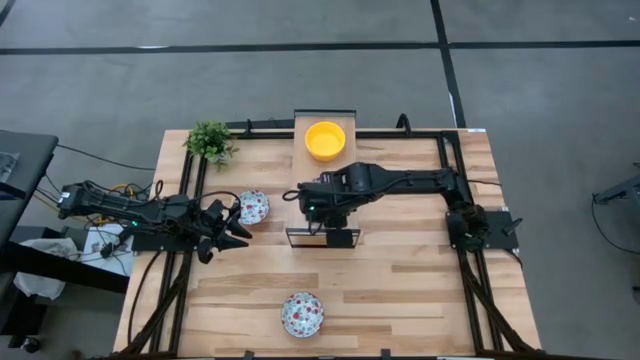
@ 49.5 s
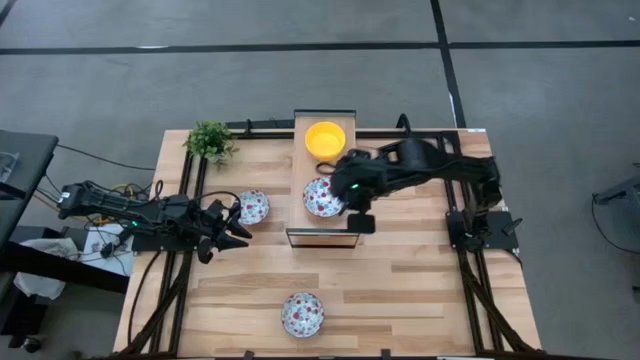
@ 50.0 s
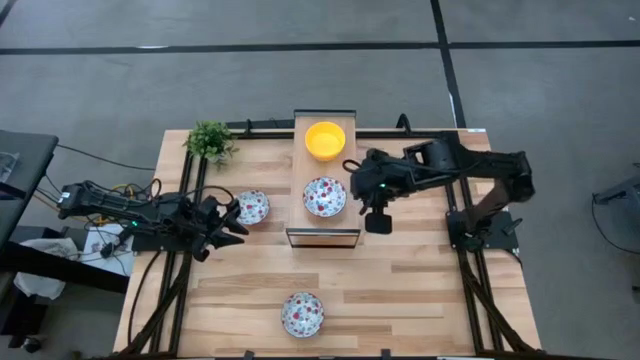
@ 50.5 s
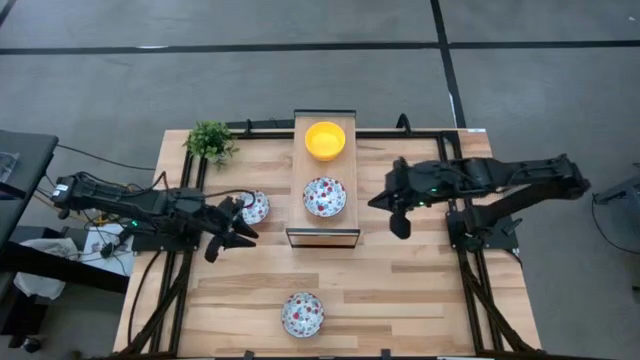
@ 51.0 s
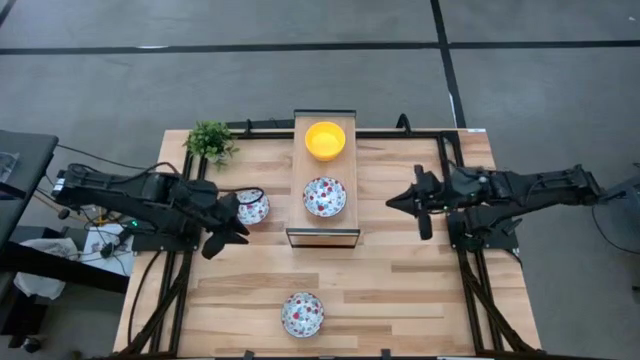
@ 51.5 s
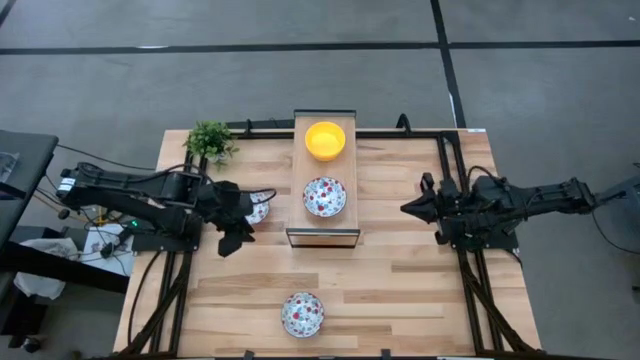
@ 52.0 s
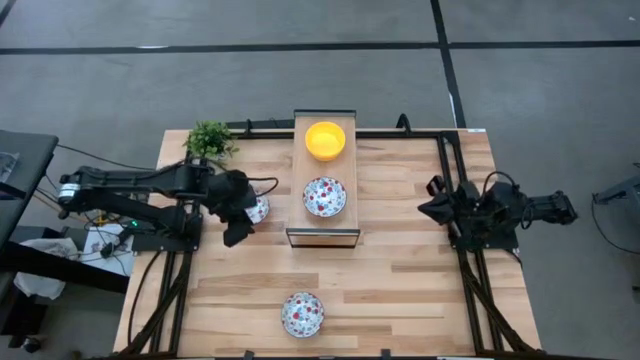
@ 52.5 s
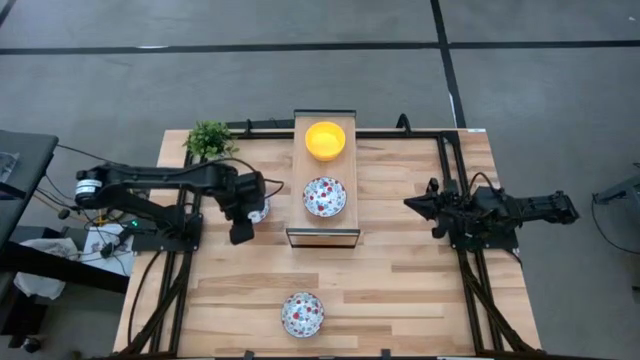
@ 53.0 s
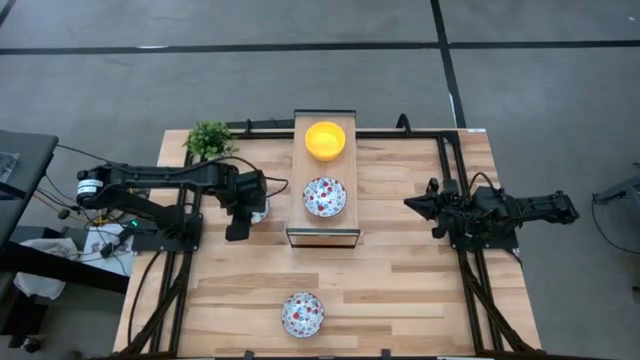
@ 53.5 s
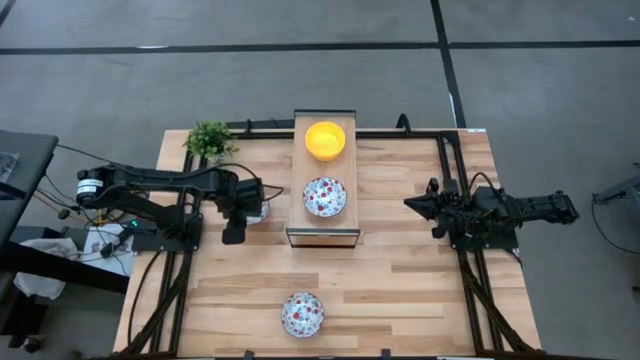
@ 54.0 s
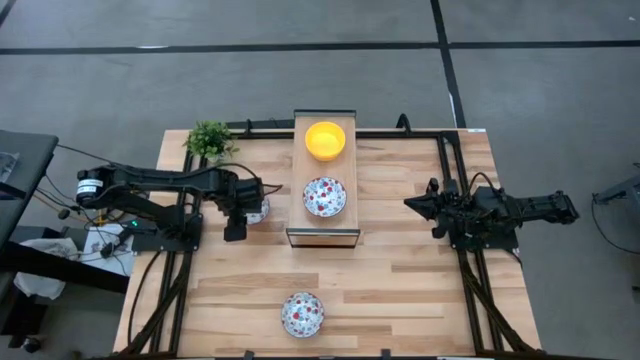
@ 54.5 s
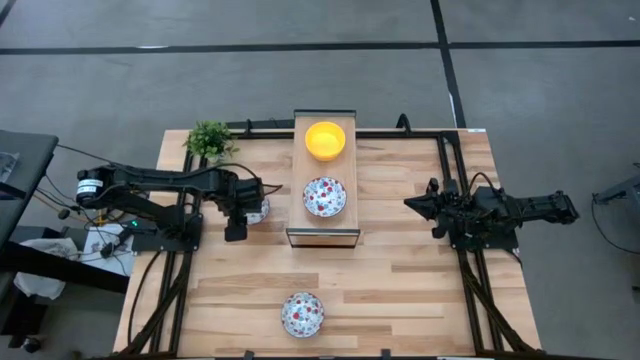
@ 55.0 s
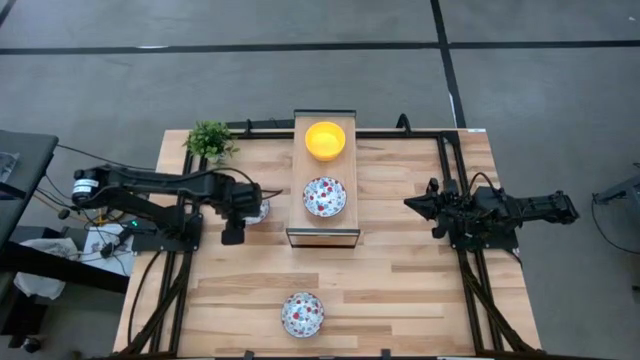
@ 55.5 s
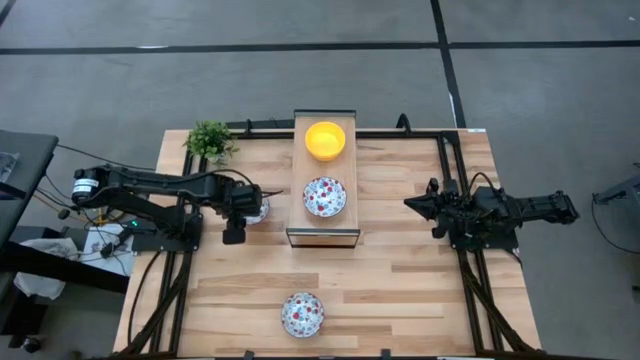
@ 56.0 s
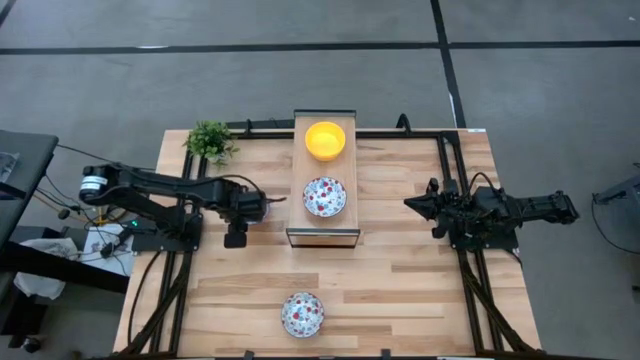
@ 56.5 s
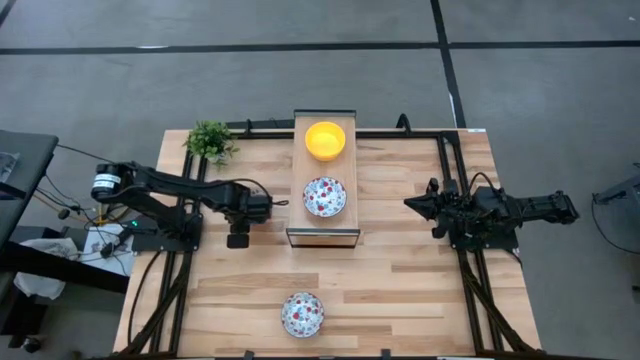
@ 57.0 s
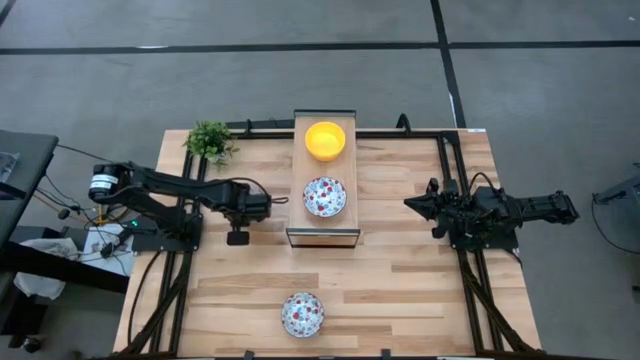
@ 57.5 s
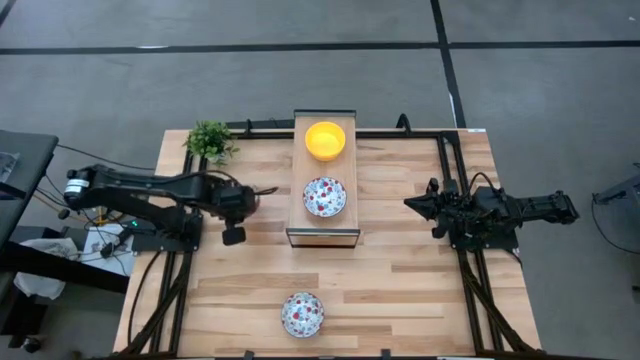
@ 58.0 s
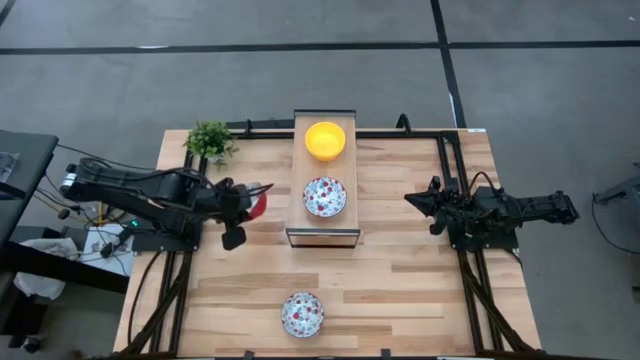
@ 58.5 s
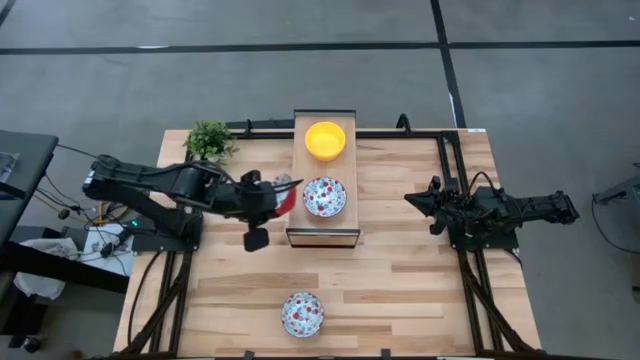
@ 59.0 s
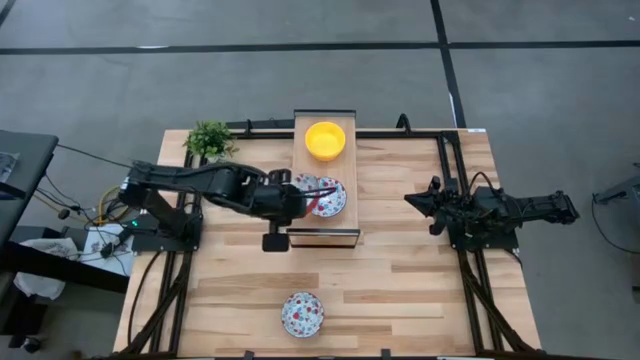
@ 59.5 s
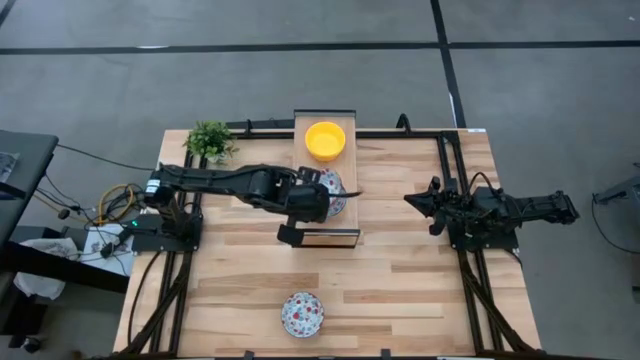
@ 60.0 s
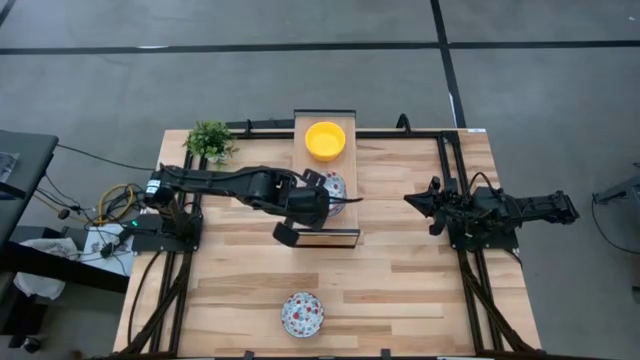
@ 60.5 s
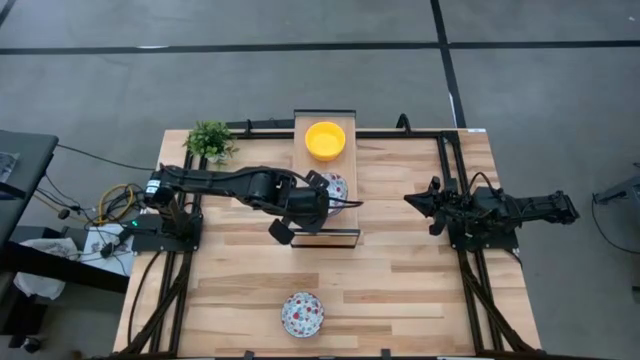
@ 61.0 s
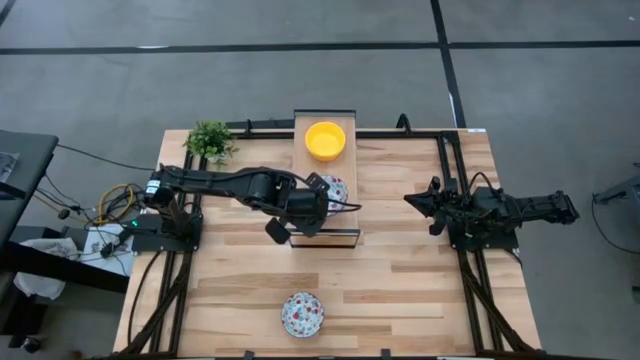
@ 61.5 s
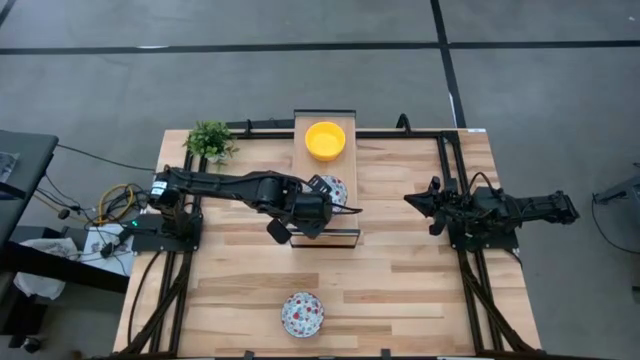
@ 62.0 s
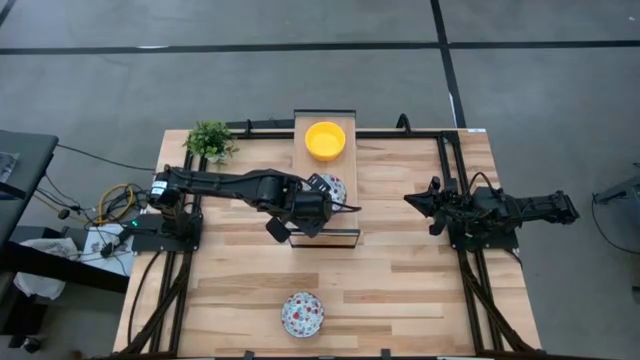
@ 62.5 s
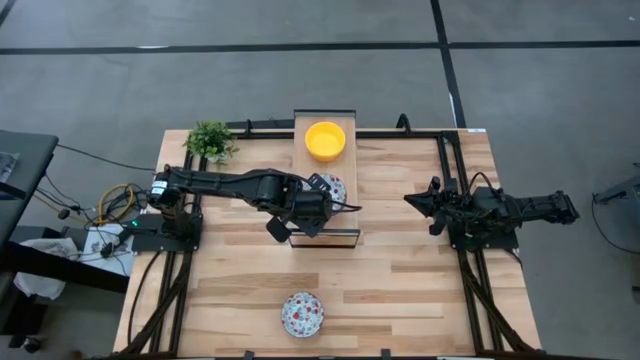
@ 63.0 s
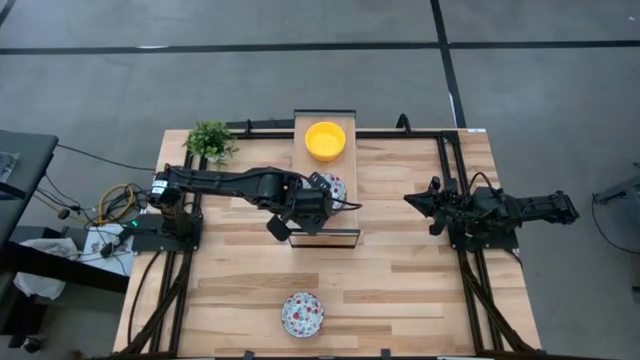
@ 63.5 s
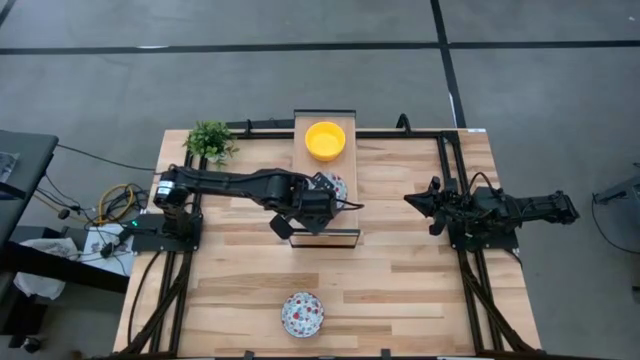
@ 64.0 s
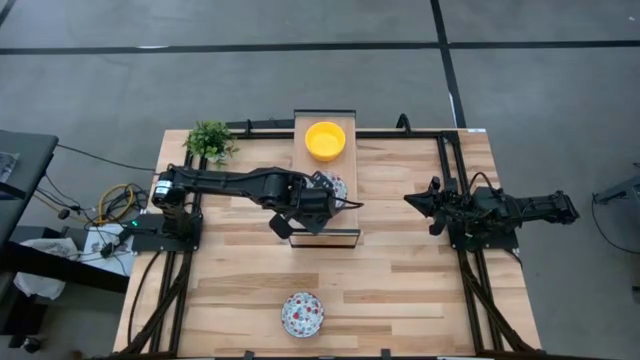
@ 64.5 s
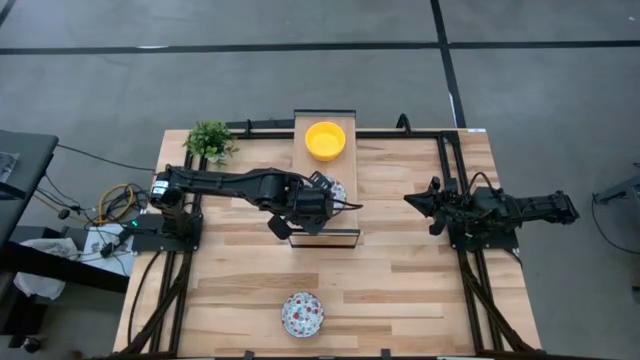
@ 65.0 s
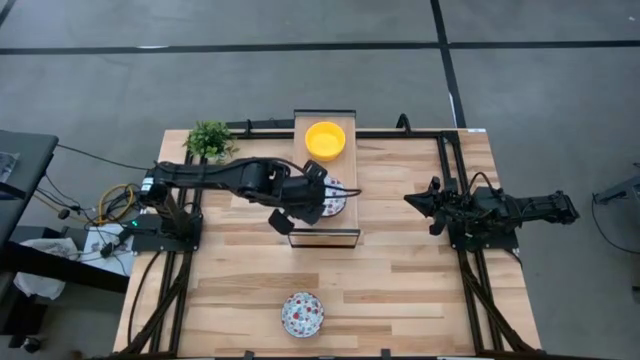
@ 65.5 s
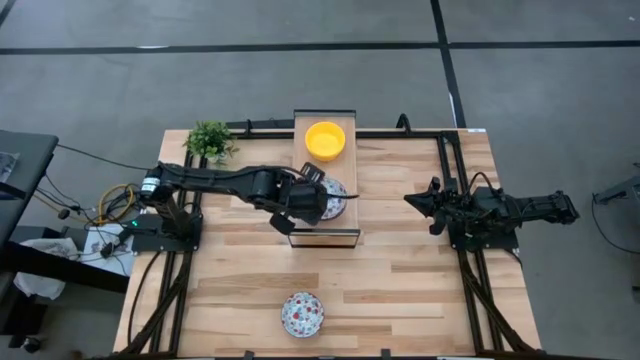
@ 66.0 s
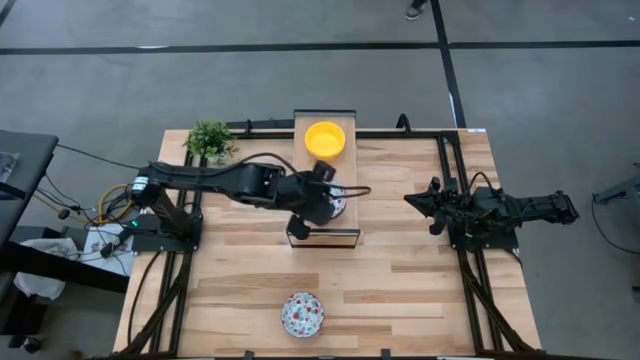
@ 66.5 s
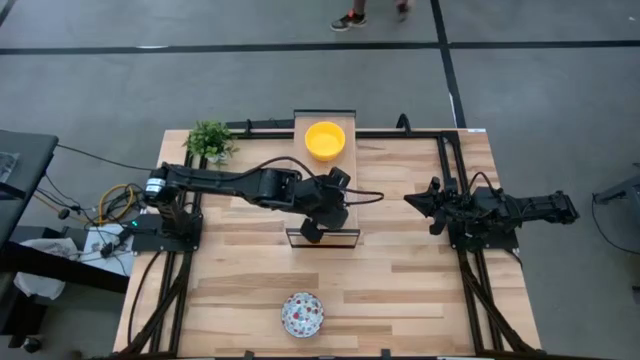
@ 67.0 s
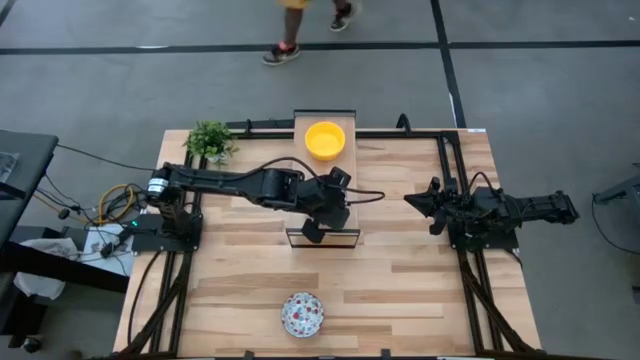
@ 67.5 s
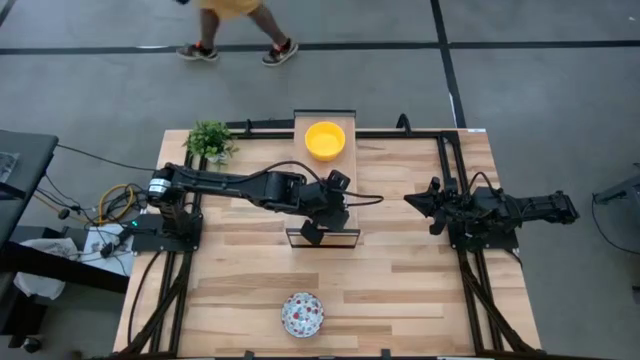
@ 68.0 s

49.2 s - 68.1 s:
Task: Pick & Place Mini bowls
Stack the top white patterned bowl on top of the white patterned bowl on the shelf

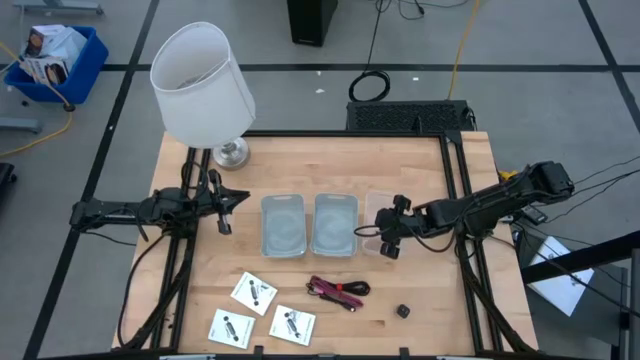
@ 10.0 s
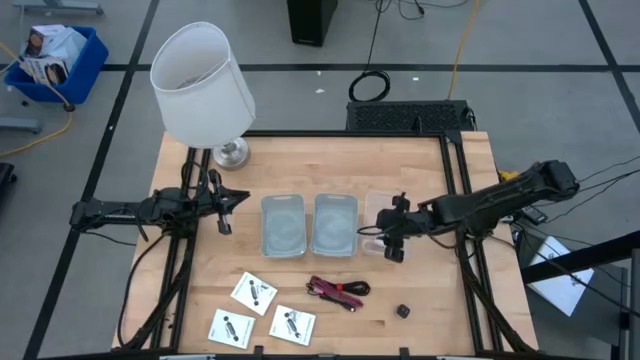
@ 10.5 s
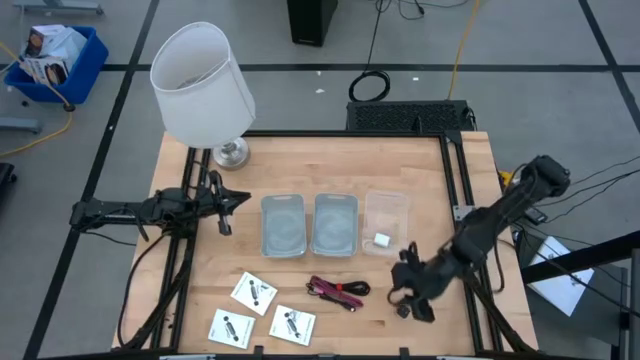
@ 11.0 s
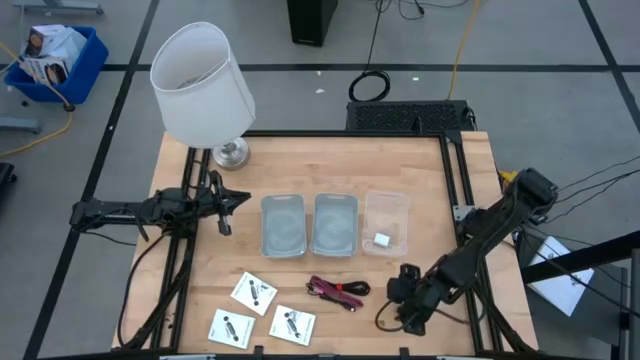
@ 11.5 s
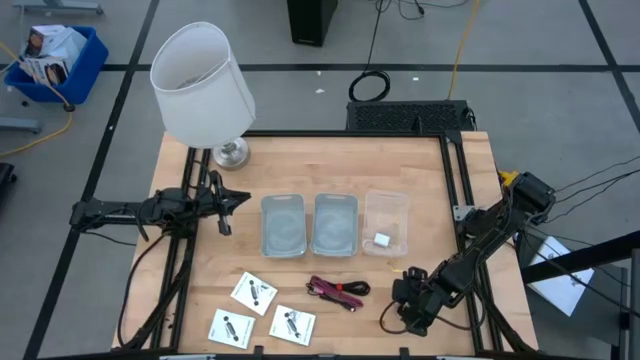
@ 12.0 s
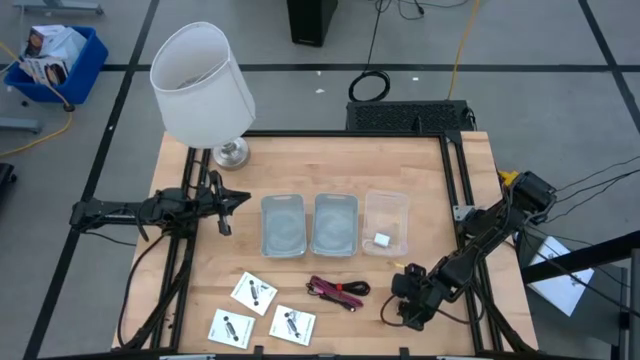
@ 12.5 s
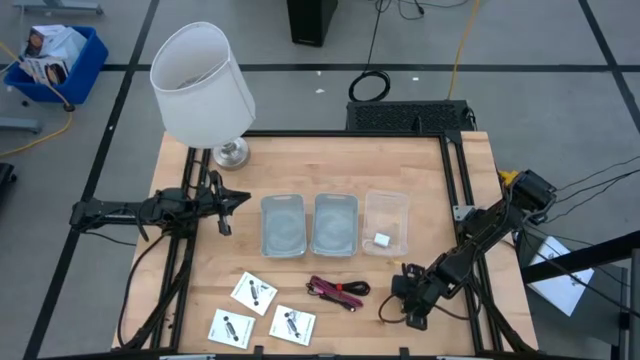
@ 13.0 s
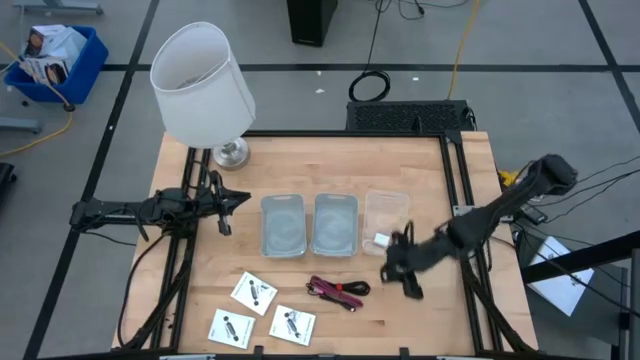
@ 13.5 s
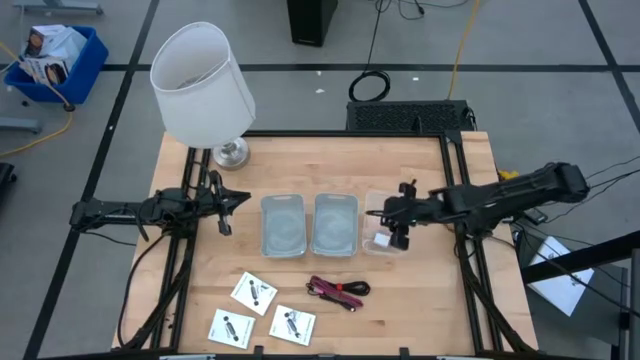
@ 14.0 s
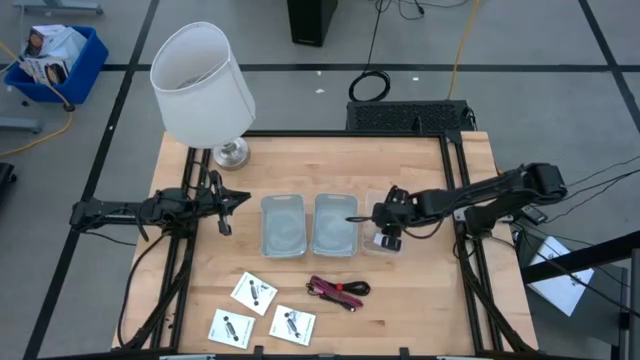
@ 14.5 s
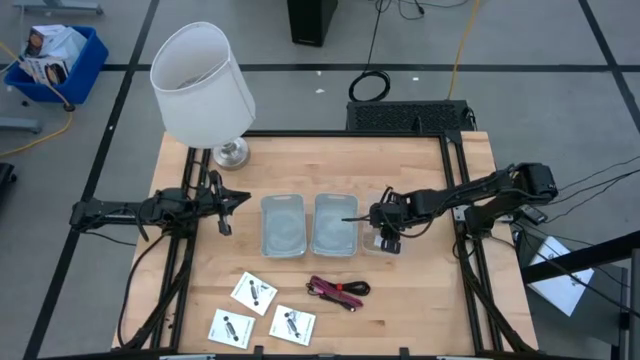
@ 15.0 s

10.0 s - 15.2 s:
Task: Pick and place items into bin
Put the black charger adapter into the transparent bin
